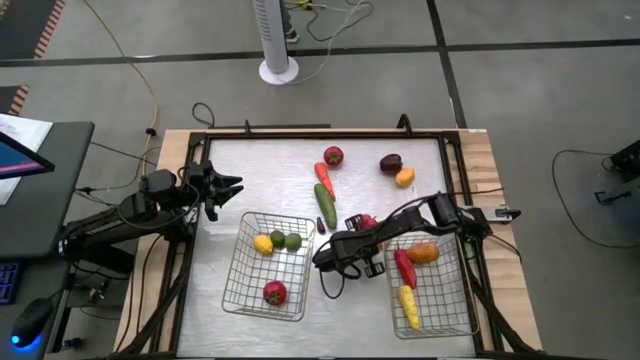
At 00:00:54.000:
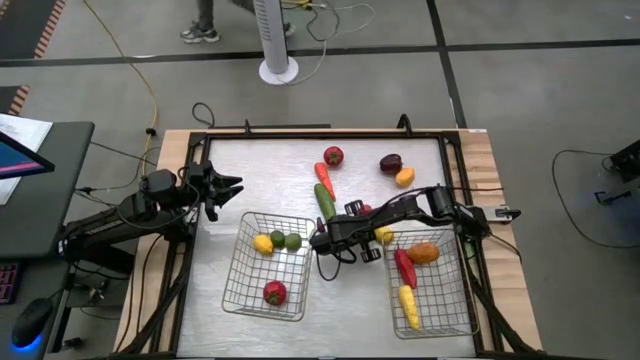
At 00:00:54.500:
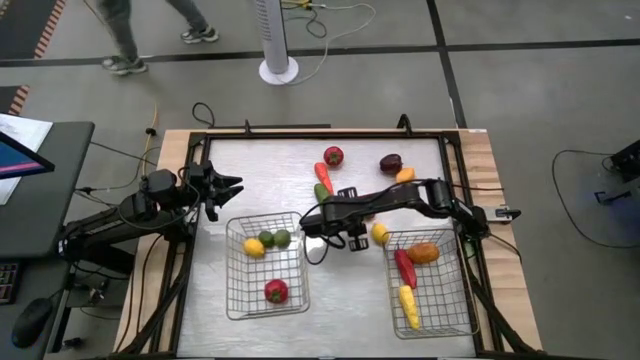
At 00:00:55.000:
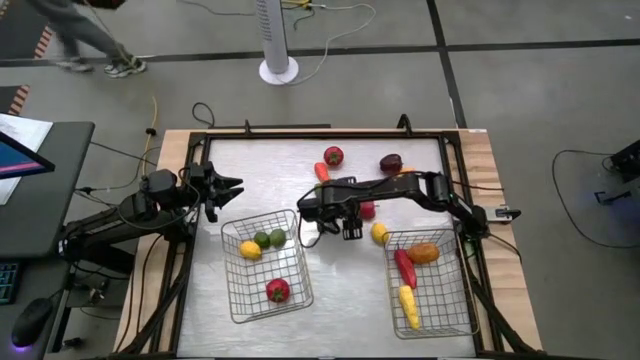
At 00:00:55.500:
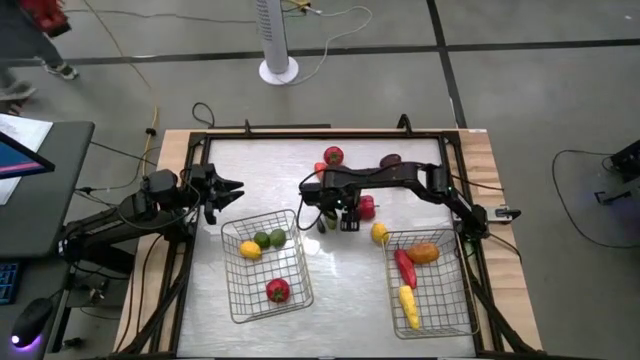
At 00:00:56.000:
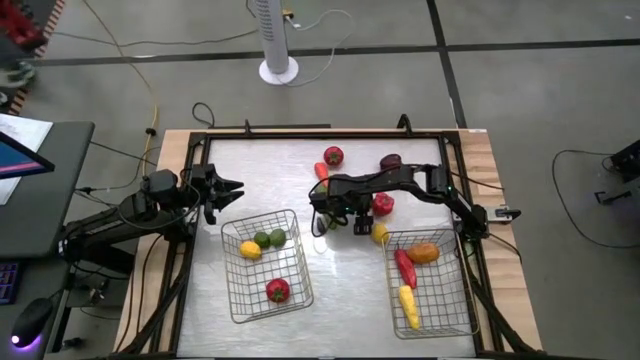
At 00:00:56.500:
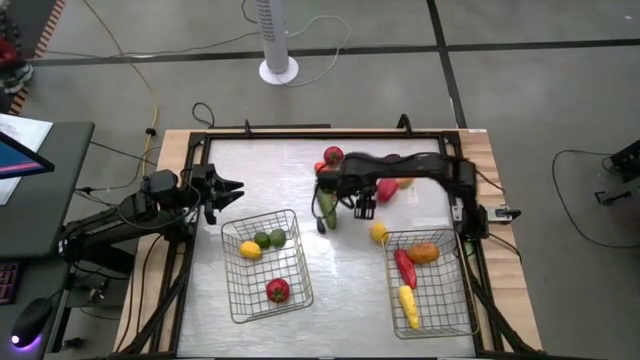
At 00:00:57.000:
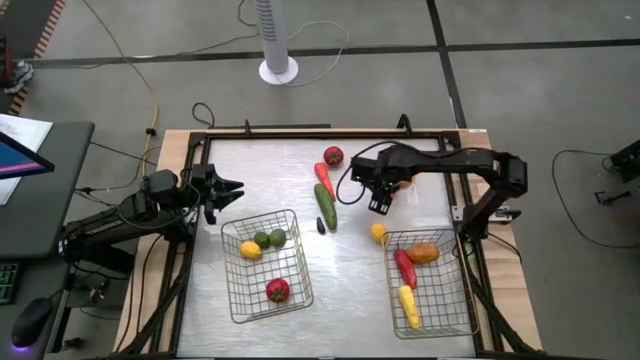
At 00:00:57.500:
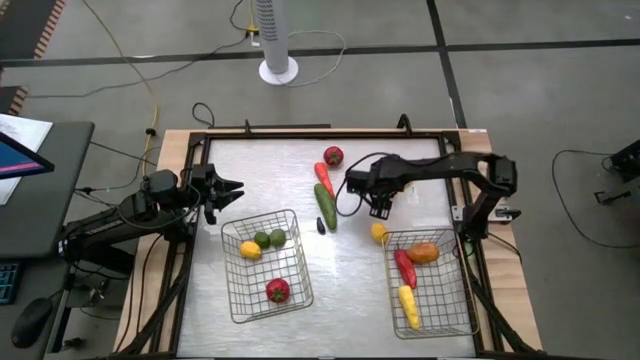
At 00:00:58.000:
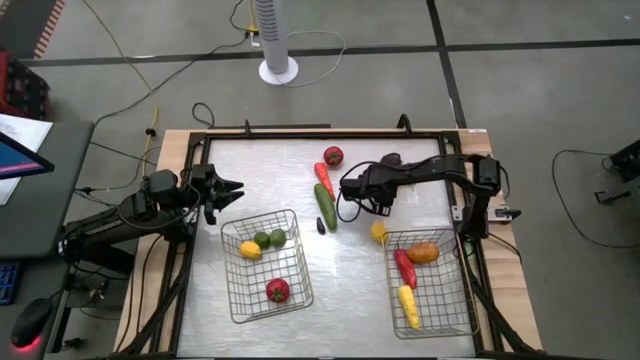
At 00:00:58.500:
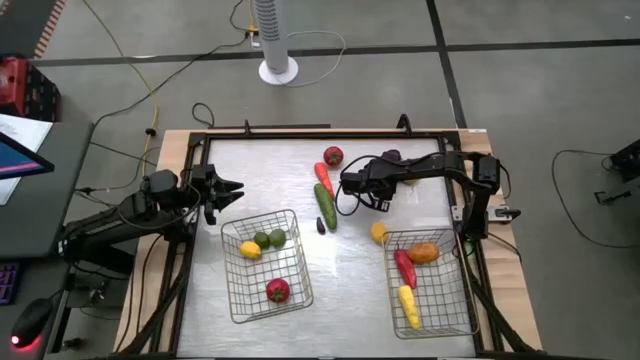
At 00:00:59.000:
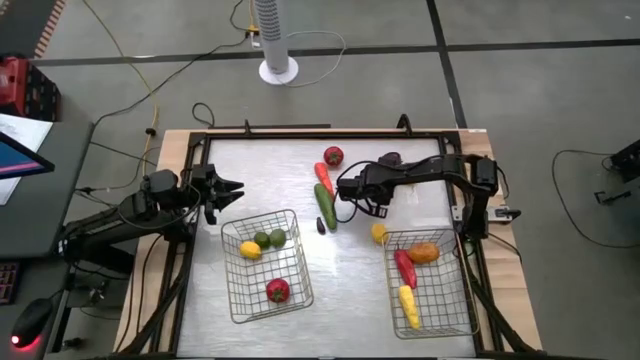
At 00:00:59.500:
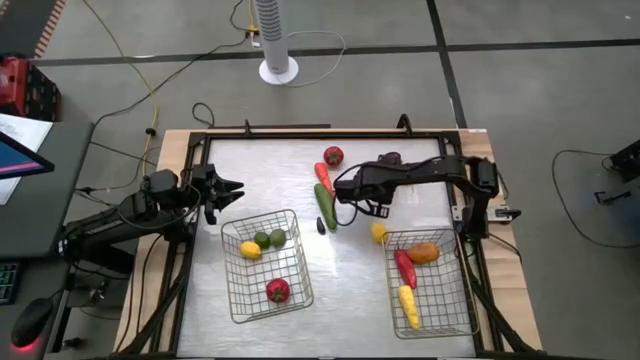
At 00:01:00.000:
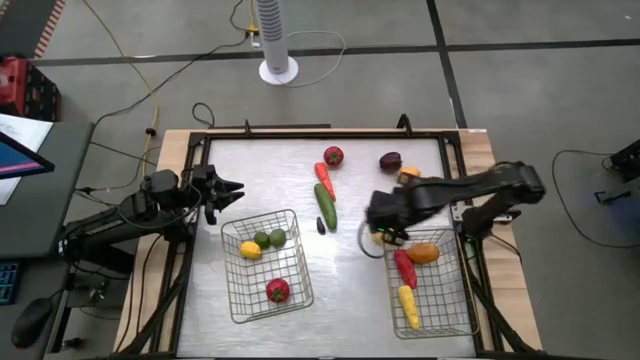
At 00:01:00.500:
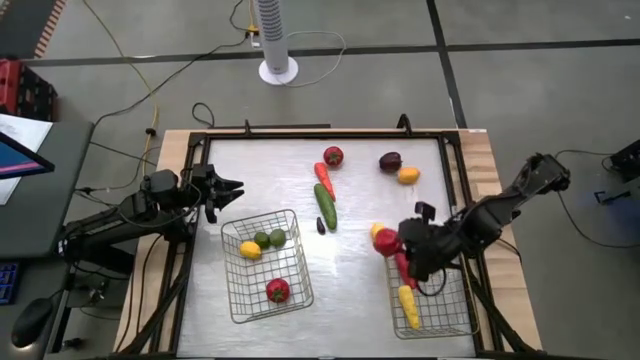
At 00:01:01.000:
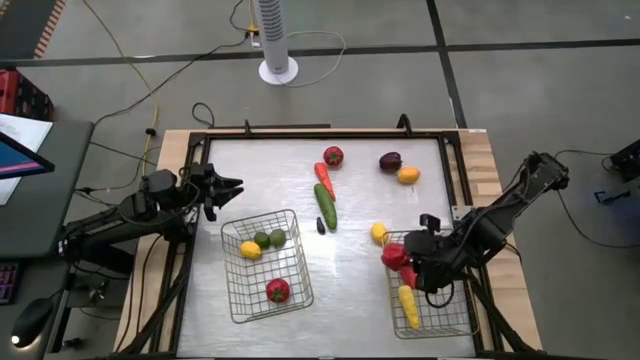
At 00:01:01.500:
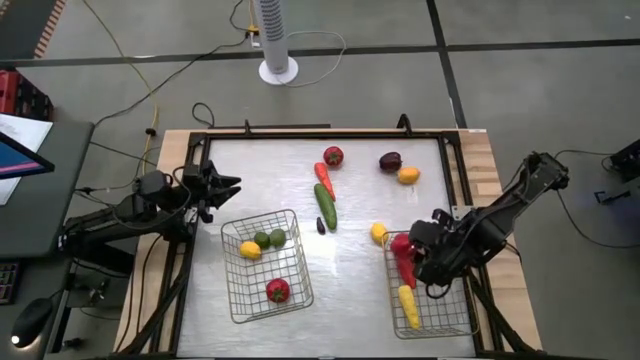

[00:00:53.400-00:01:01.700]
Task: Sort produce into baskets
Put the red bell pepper into the right wire basket

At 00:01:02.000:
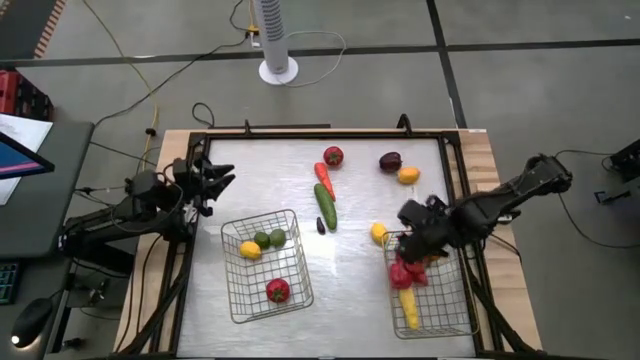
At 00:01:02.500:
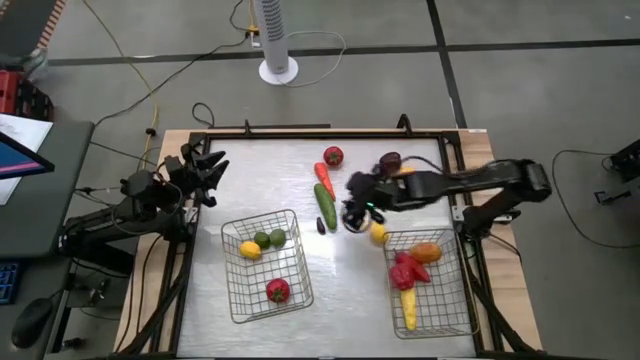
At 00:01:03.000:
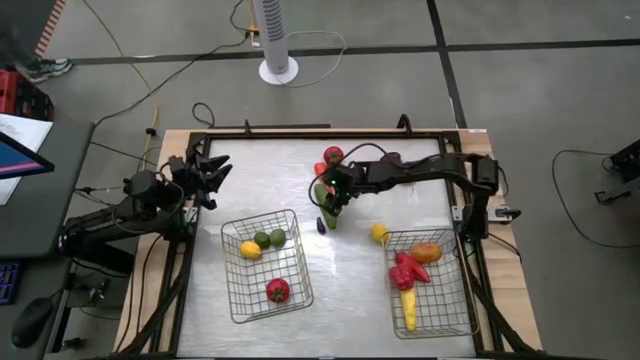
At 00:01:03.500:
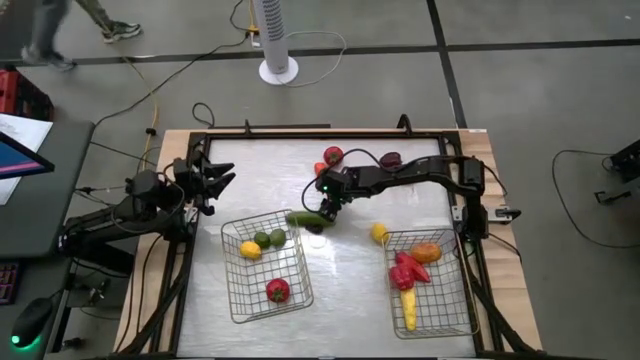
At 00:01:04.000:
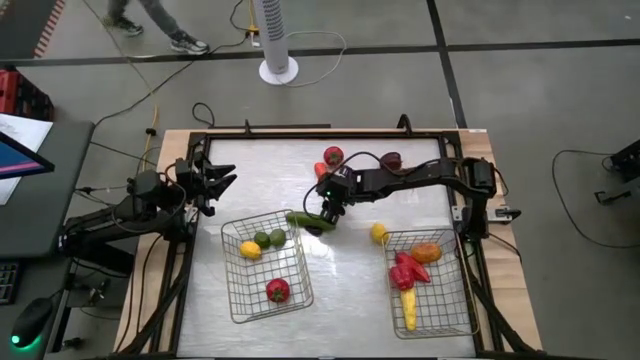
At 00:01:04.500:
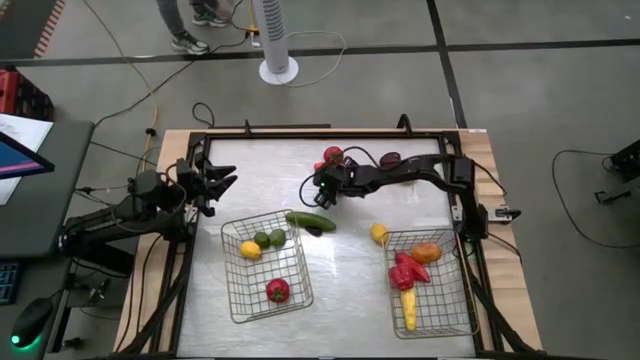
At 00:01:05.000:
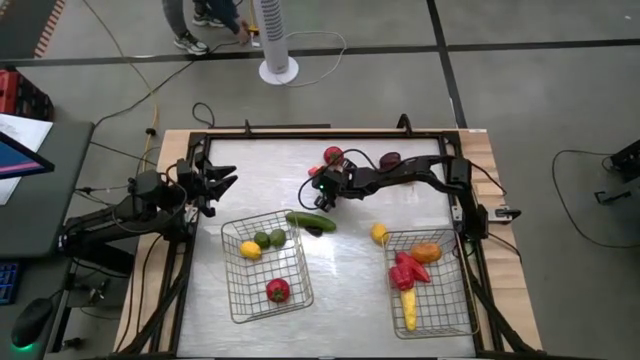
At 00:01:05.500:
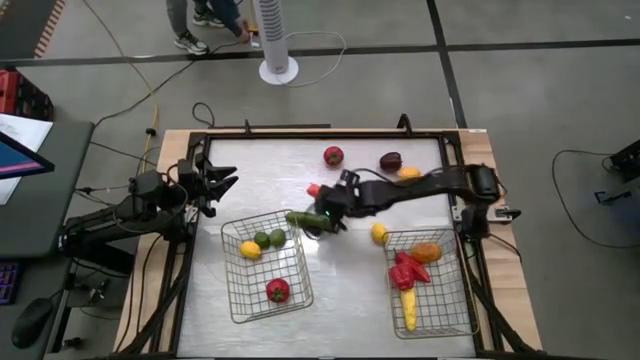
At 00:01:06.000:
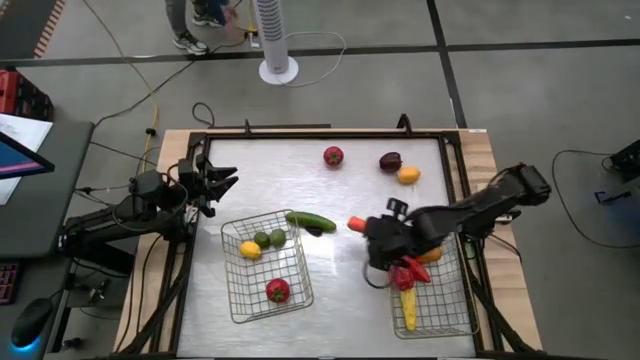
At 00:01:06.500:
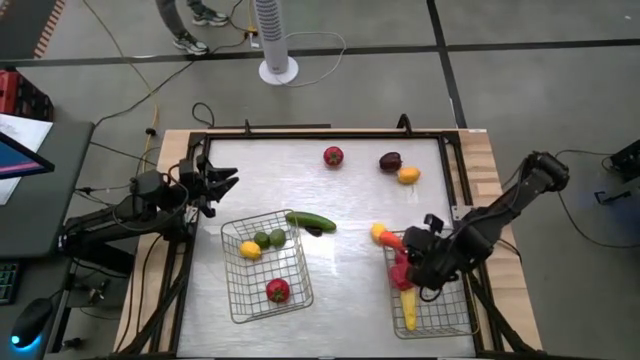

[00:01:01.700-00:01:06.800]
Put the orange carrot into the right wire basket

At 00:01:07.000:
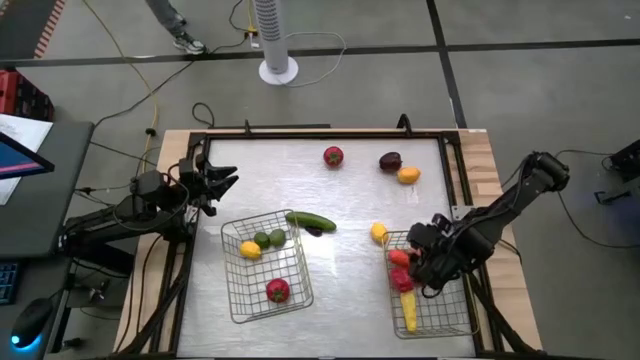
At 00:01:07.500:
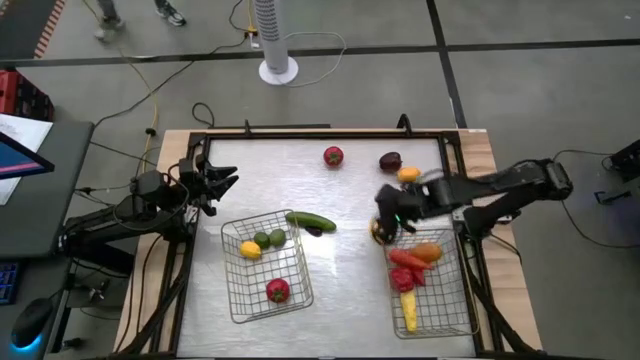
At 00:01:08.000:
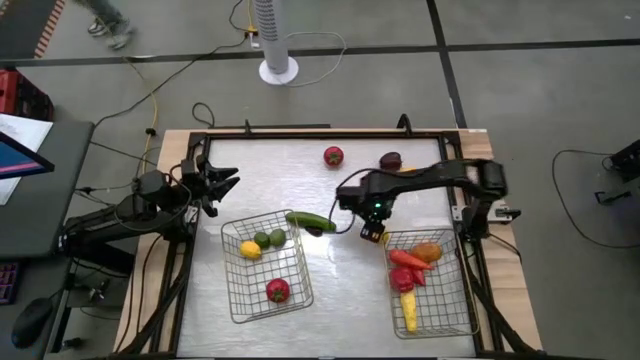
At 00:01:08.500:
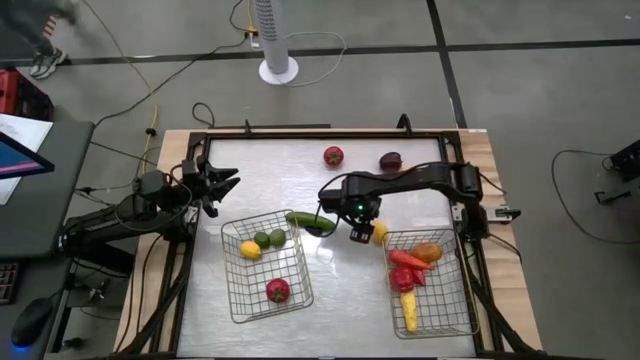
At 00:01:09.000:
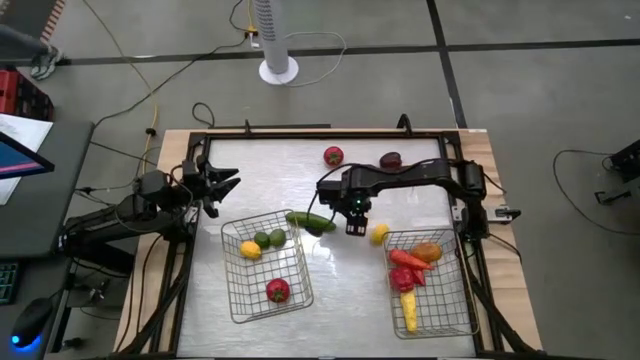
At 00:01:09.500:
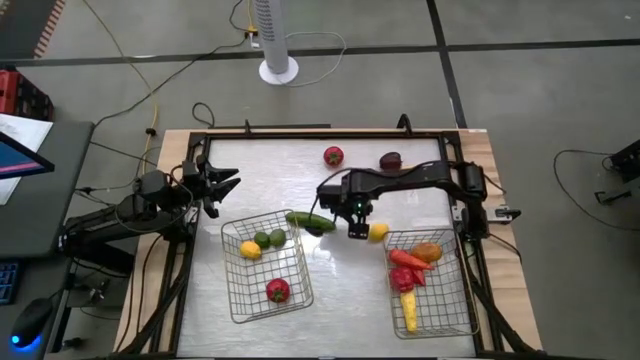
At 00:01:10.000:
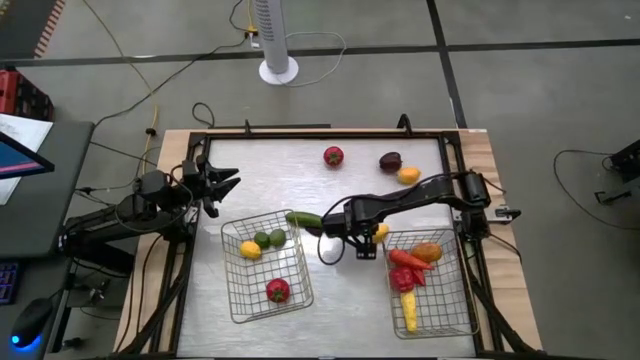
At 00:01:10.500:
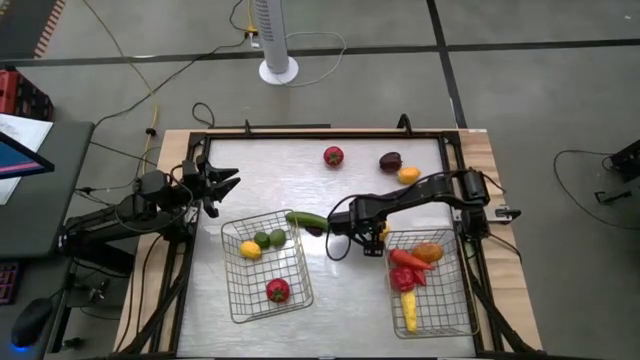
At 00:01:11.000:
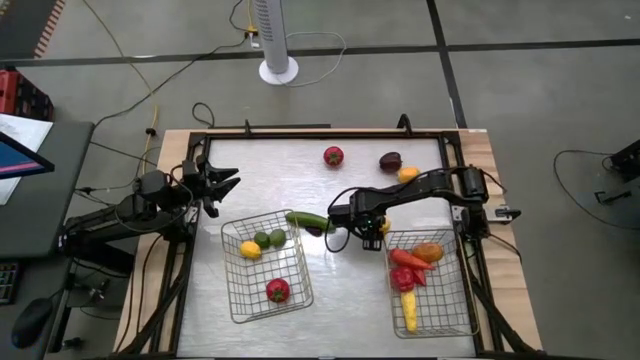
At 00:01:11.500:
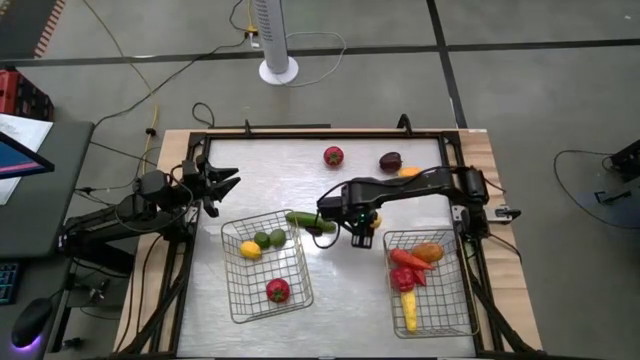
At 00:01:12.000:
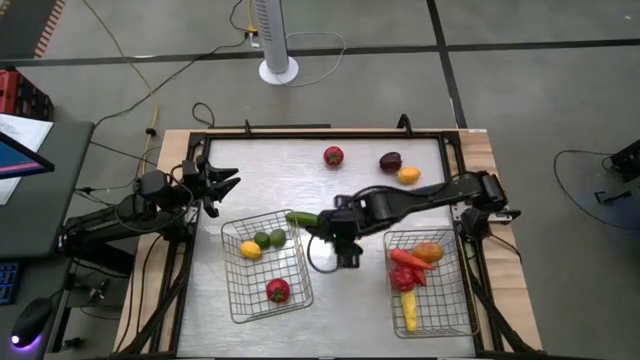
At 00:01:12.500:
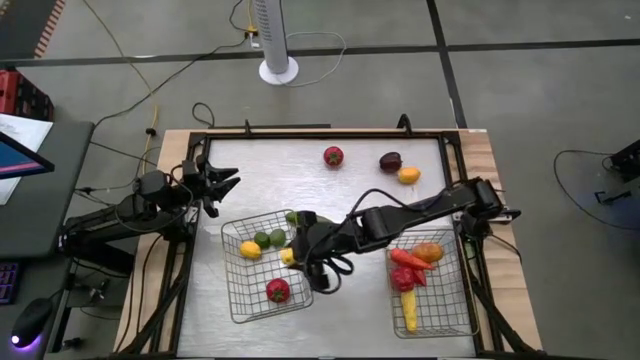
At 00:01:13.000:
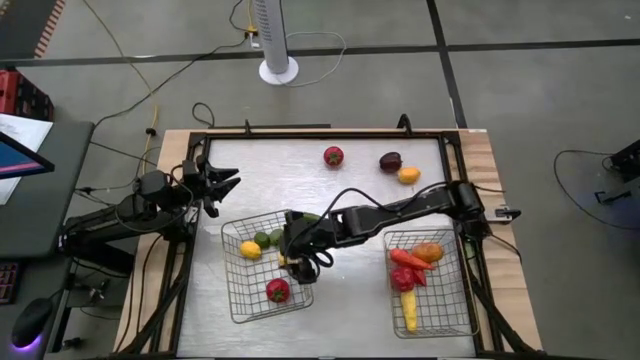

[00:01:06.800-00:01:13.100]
Put the yellow lemon into the left wire basket

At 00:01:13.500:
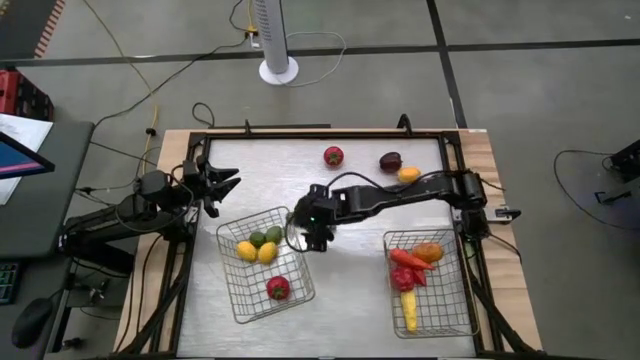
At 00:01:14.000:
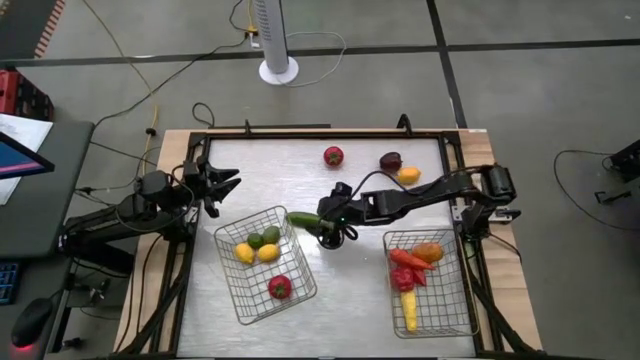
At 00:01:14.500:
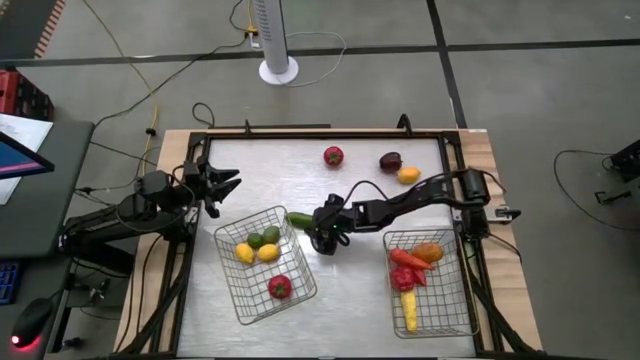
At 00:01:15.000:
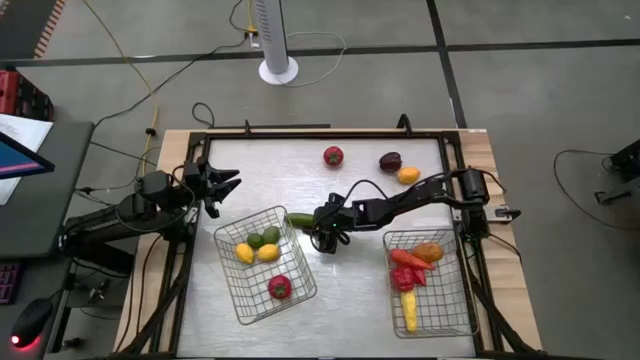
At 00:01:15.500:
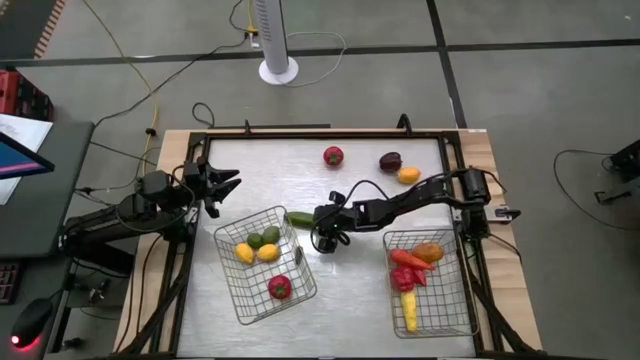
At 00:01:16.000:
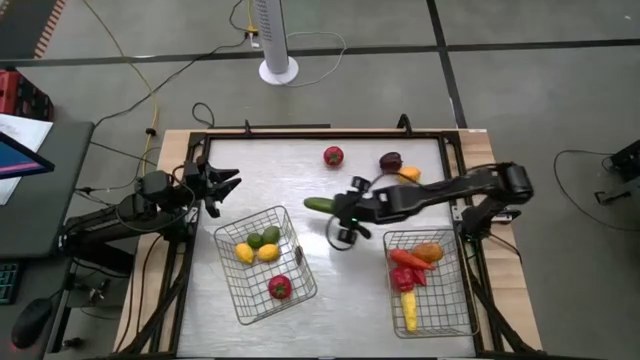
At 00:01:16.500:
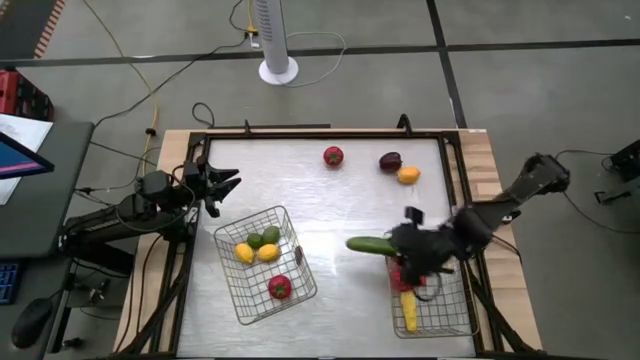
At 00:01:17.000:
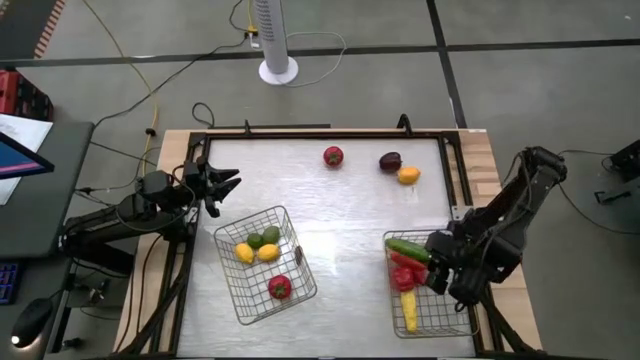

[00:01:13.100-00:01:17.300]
Put the green cucumber into the right wire basket
